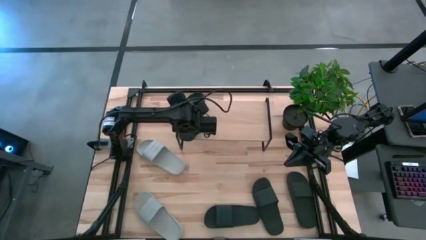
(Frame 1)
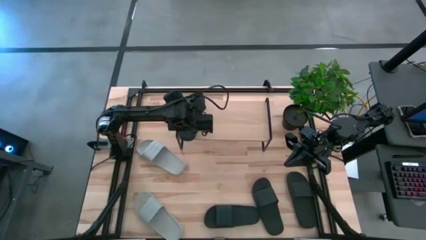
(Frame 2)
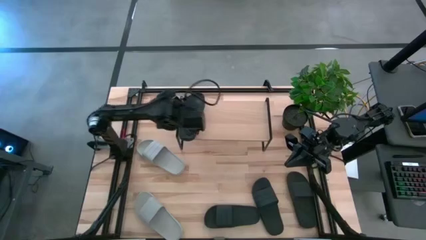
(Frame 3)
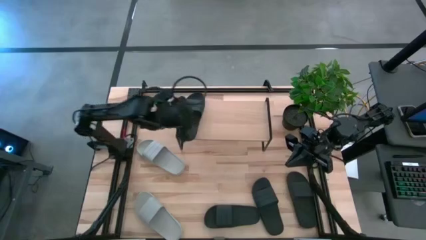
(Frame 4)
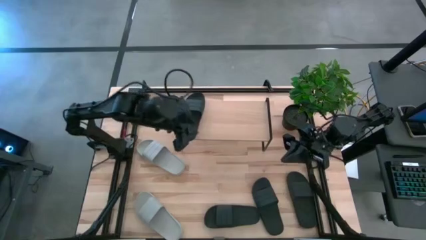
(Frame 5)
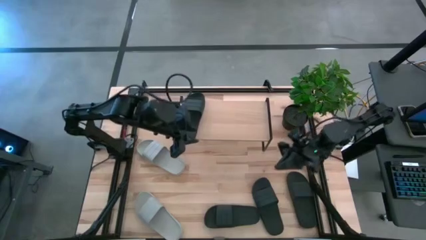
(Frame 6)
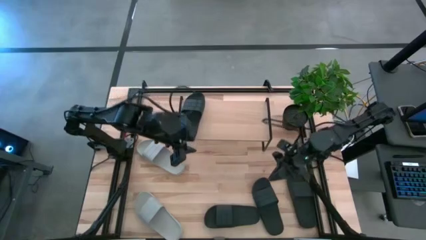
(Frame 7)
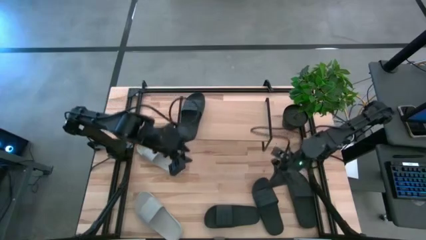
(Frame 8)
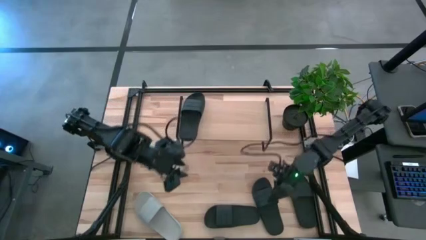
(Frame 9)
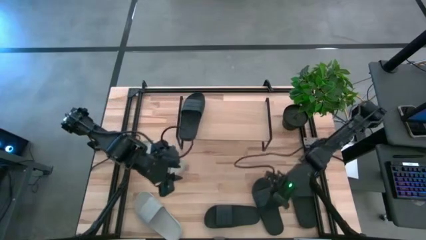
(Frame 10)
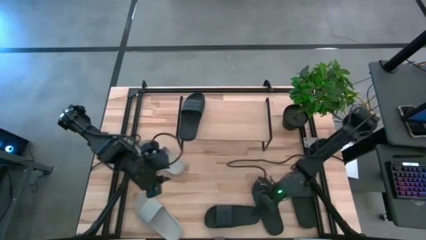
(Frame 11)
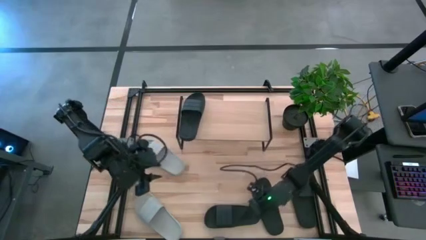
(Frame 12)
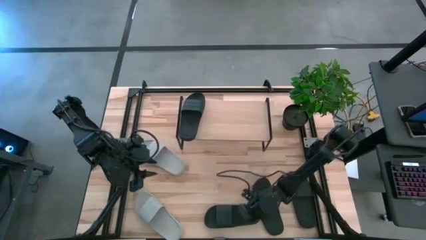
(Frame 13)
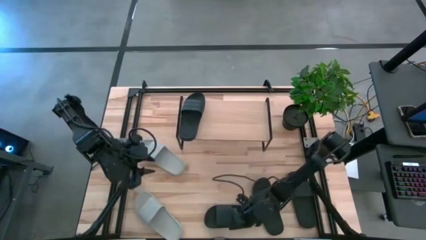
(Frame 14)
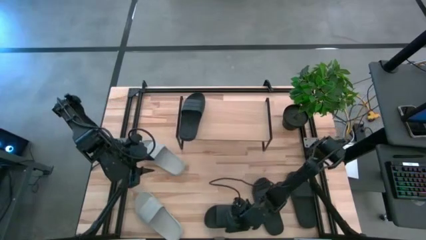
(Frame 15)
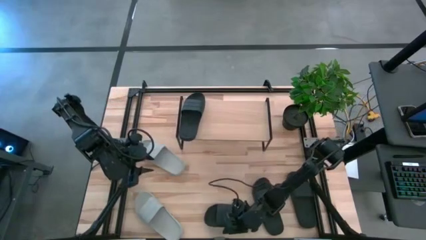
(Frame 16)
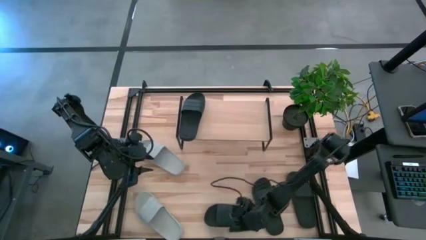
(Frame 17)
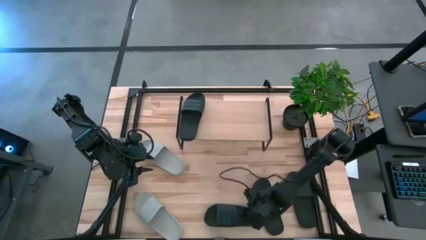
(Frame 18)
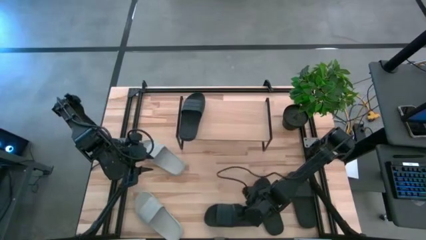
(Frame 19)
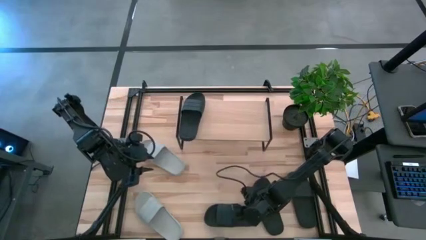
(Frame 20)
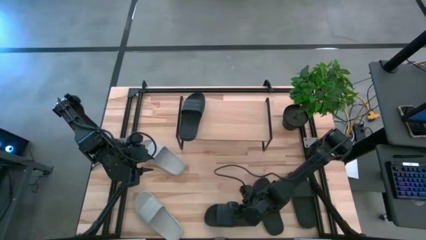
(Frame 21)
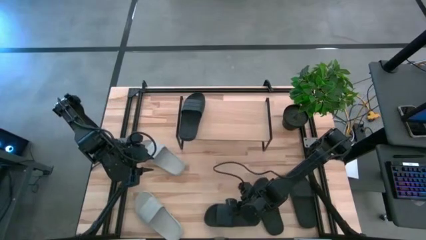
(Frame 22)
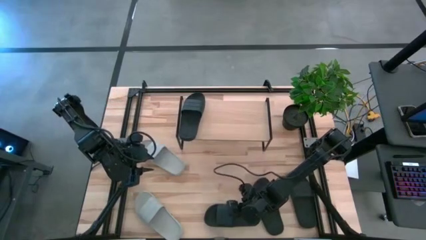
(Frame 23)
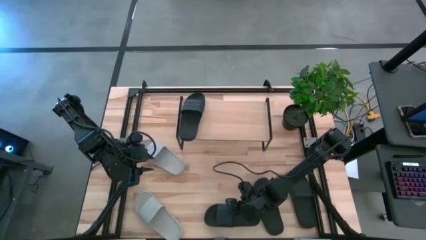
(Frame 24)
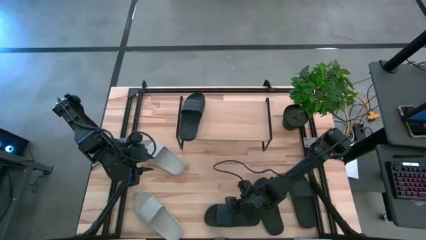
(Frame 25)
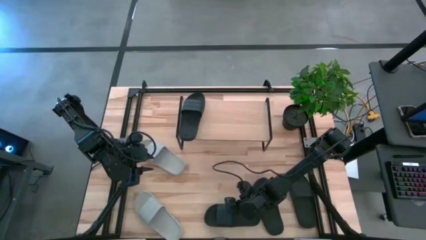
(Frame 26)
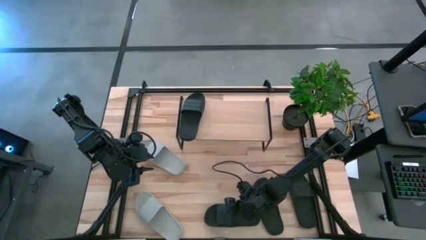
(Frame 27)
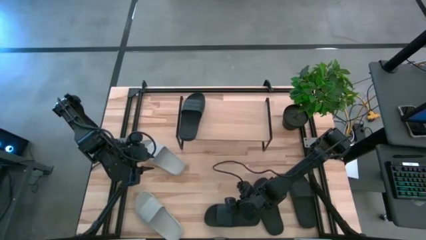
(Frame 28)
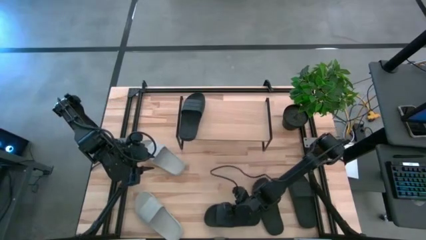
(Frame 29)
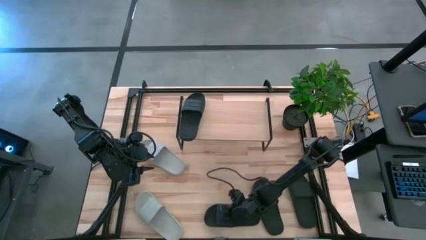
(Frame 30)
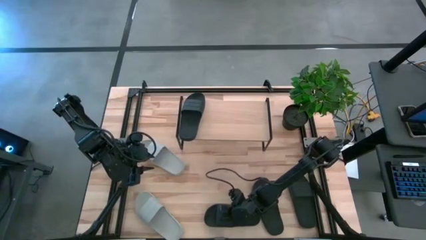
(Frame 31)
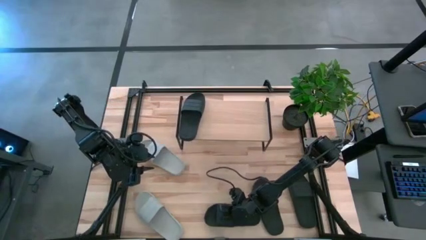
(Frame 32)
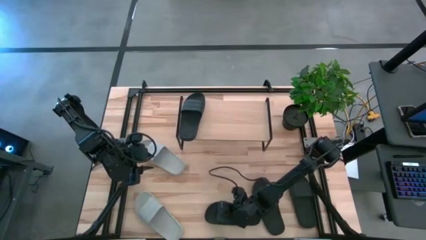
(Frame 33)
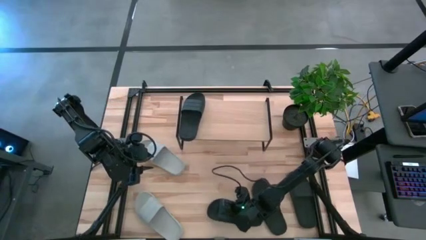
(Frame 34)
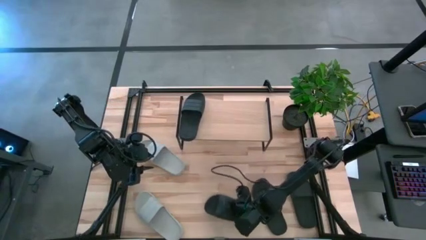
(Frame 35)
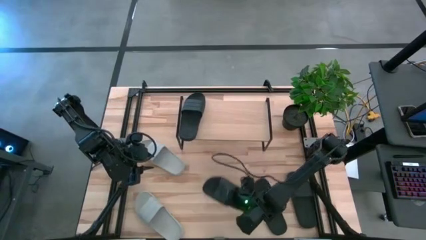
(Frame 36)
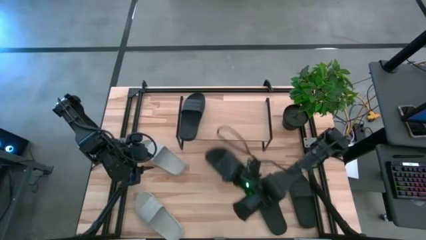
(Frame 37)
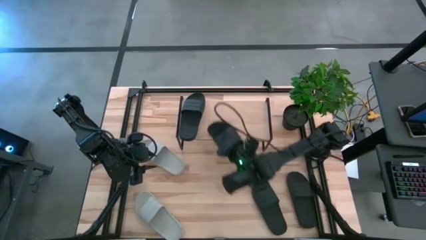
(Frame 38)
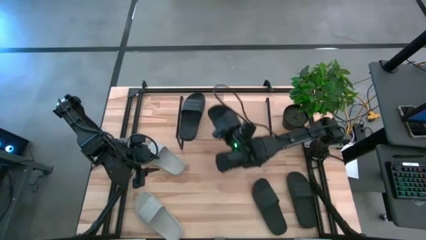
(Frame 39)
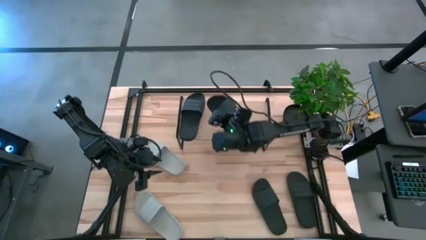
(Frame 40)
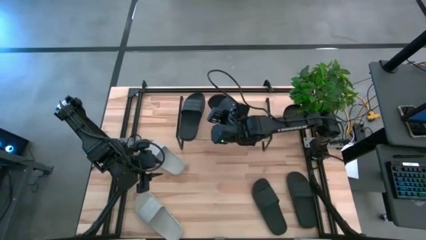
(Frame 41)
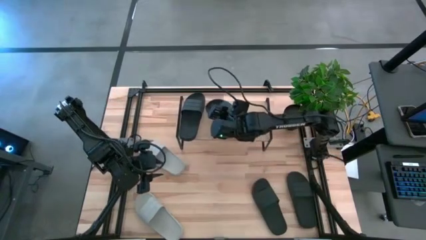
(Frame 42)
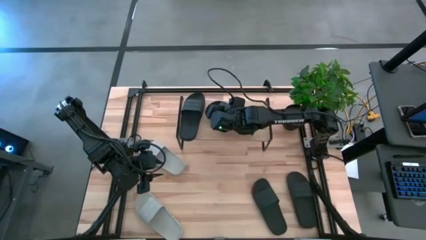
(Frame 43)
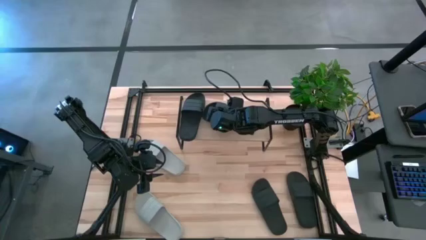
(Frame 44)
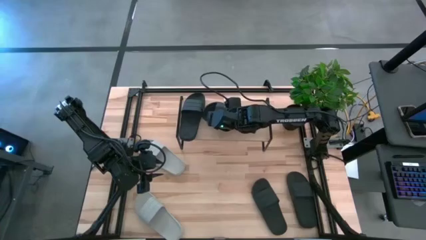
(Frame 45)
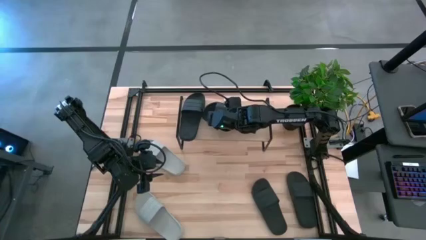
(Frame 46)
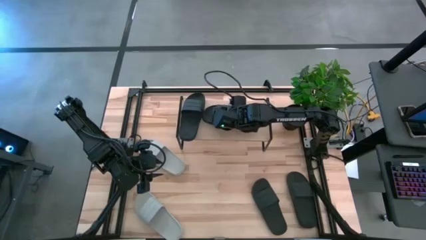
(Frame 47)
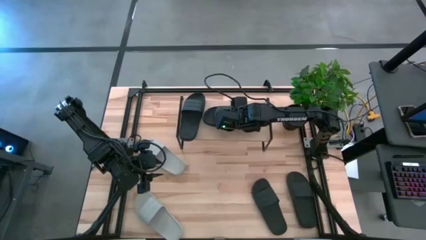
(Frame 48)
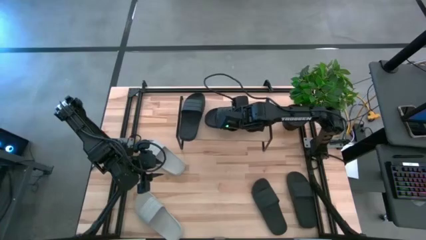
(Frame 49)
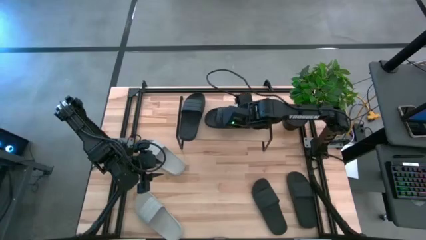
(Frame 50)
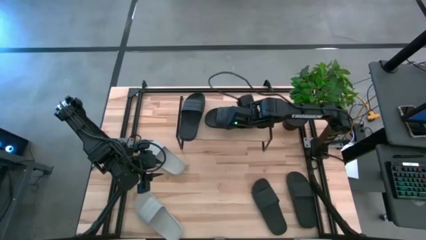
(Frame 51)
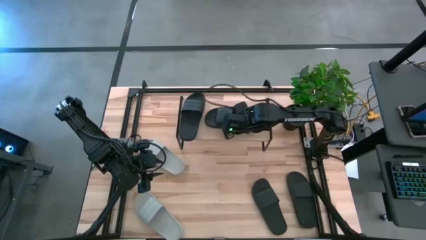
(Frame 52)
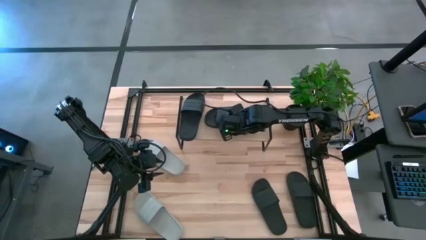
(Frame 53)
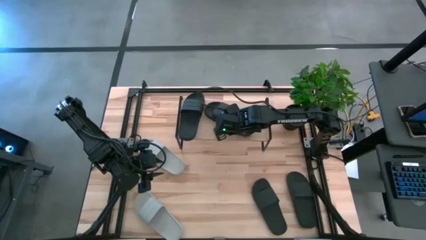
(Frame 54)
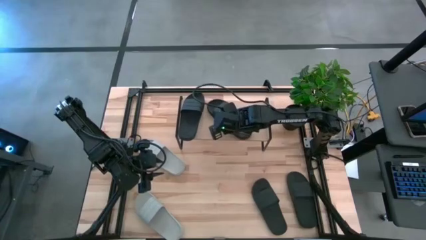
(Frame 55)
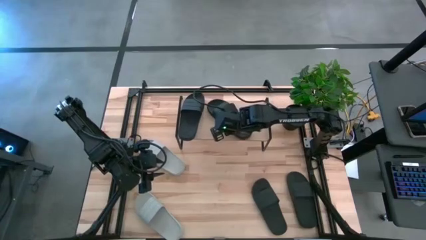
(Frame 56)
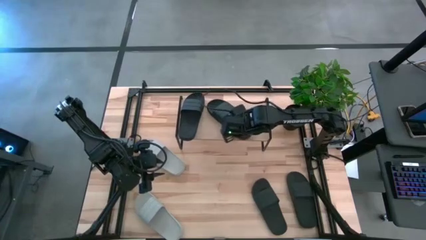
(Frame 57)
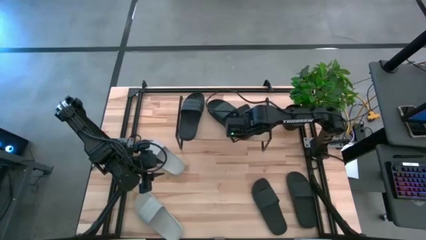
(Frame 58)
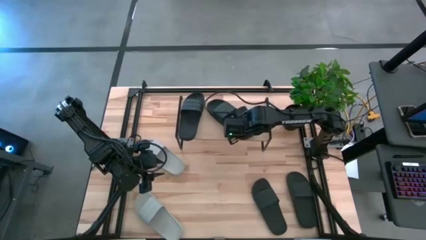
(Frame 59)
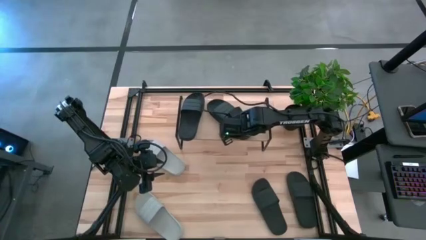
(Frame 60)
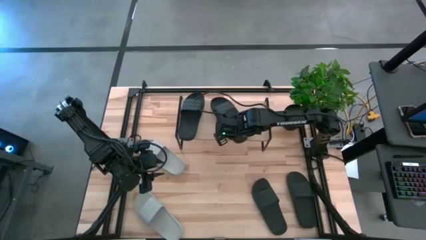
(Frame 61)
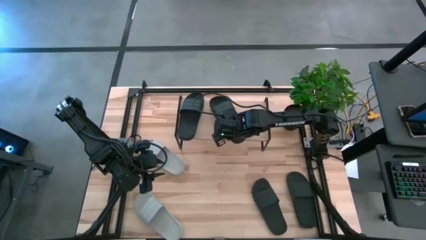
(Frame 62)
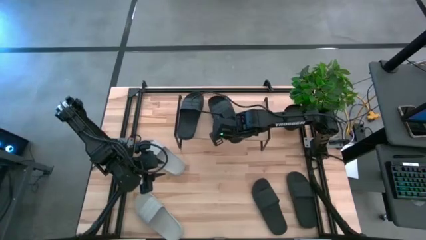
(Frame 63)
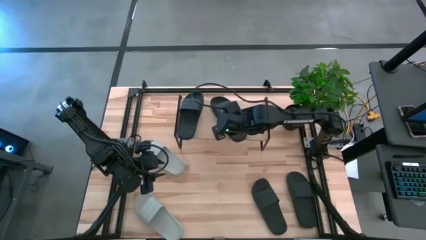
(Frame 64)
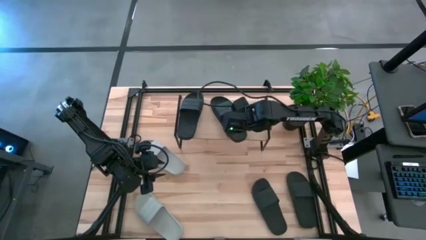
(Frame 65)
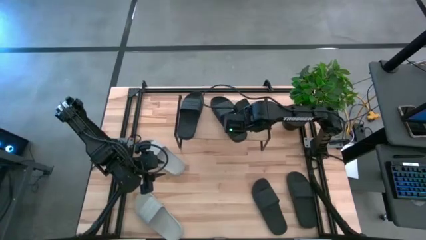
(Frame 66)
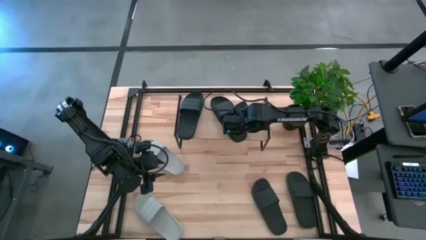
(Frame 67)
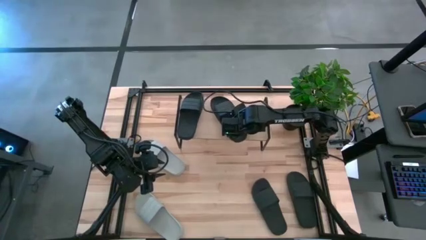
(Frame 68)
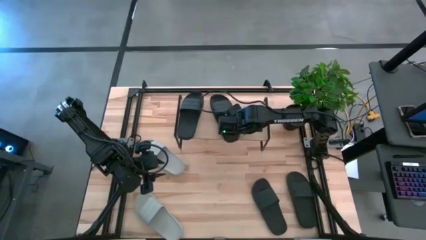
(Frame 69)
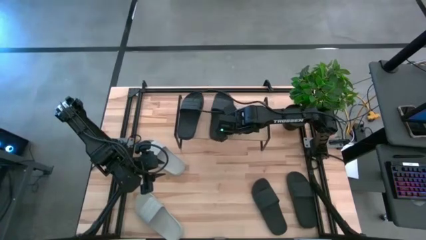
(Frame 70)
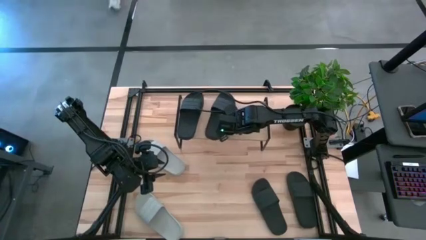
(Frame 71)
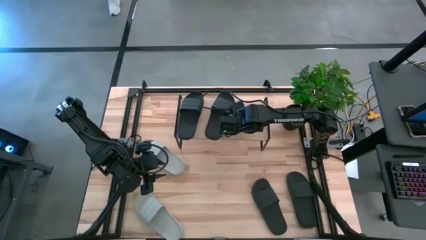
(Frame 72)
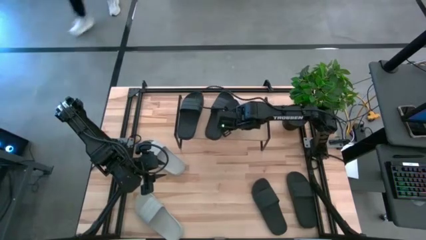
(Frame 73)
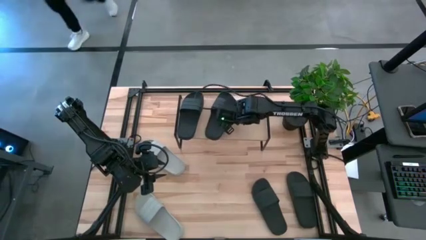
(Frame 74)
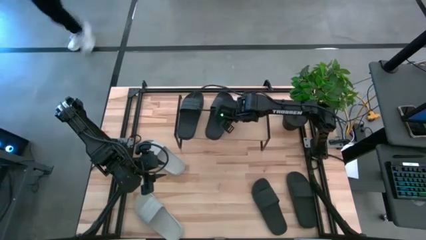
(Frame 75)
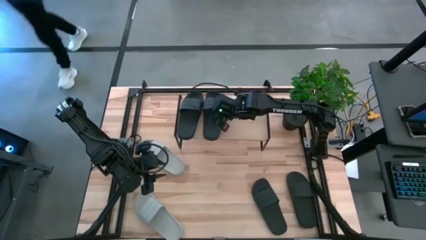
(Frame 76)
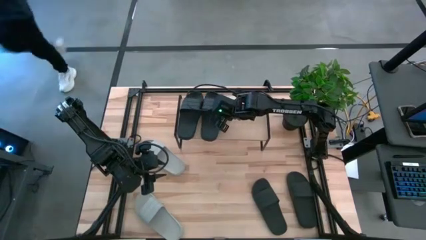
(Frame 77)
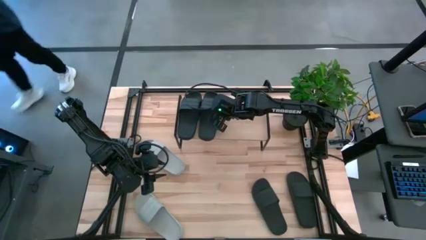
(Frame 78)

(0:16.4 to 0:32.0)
Task: Pick and place slides into the shelf
Put the black slipper on the shelf
